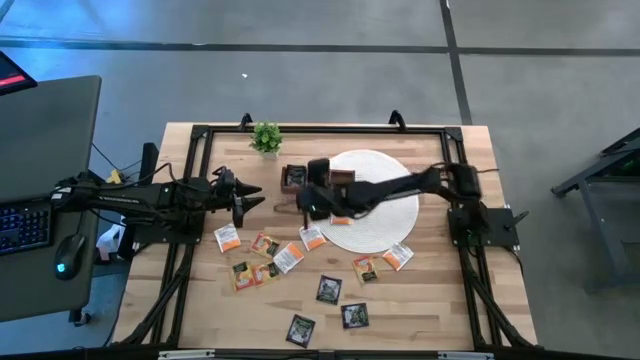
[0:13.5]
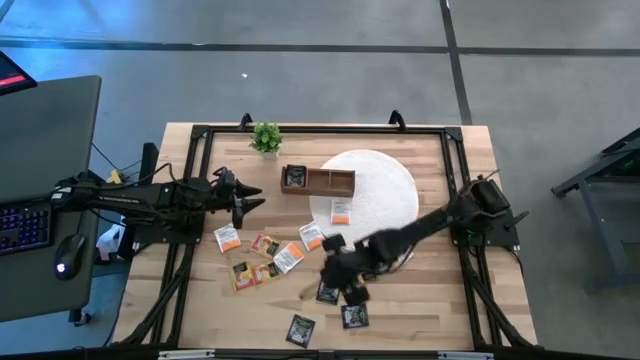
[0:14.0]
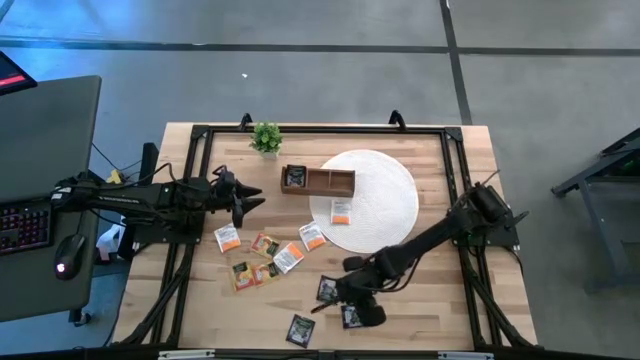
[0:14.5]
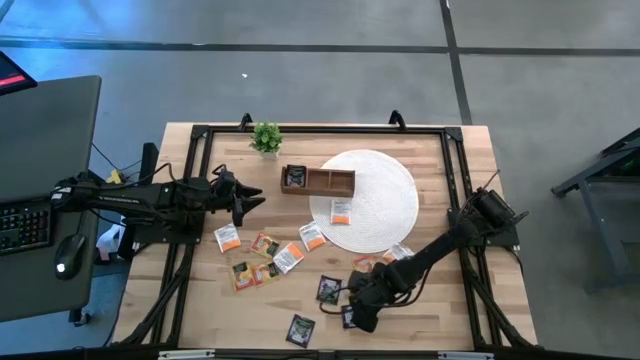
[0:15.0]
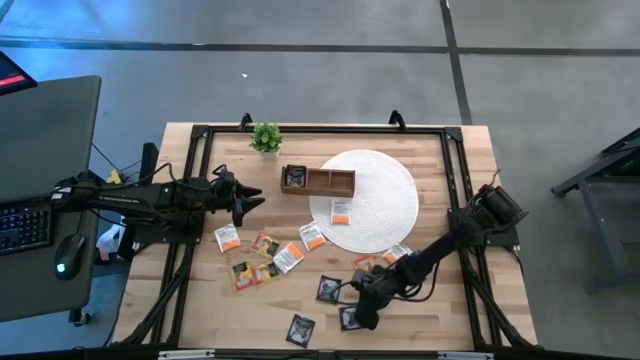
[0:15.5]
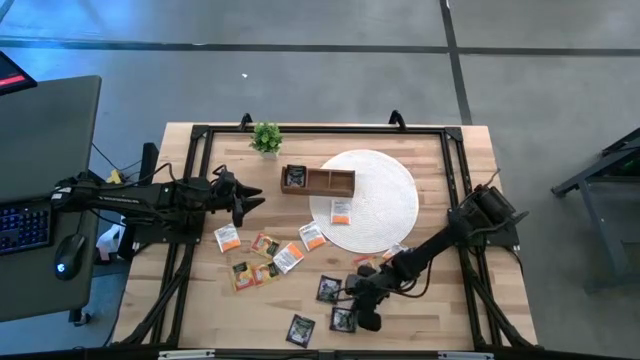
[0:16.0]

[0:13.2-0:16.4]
Task: Pick & Place Tea
Put the violet tea bag into the left section of the wooden organizer

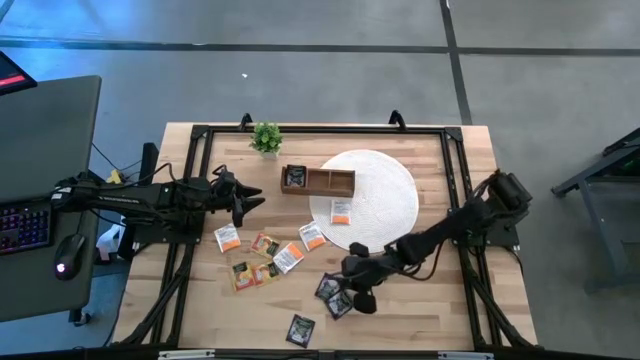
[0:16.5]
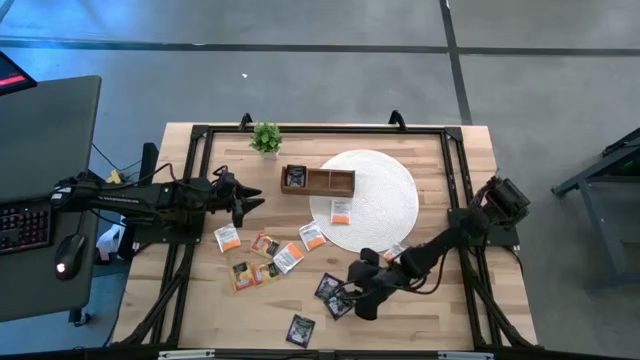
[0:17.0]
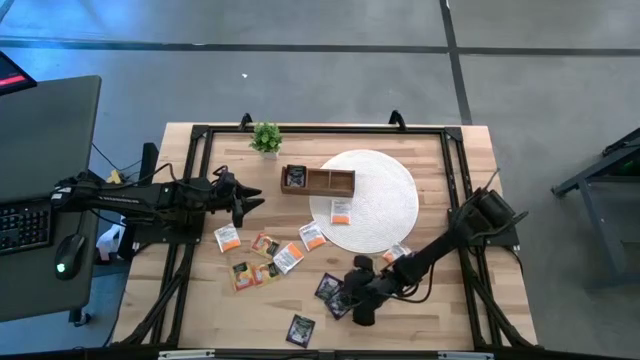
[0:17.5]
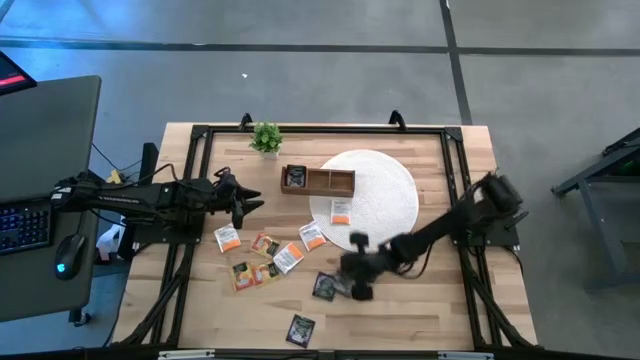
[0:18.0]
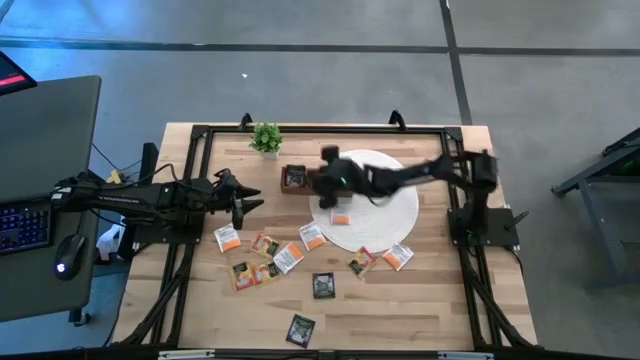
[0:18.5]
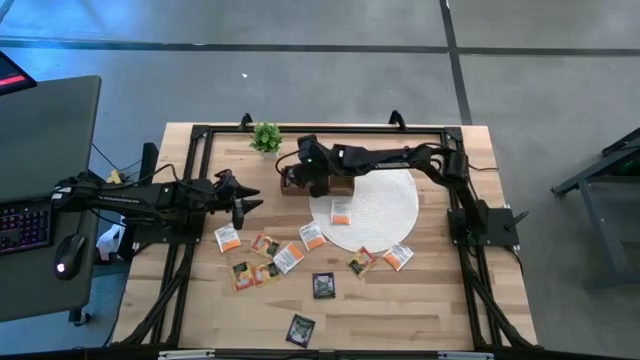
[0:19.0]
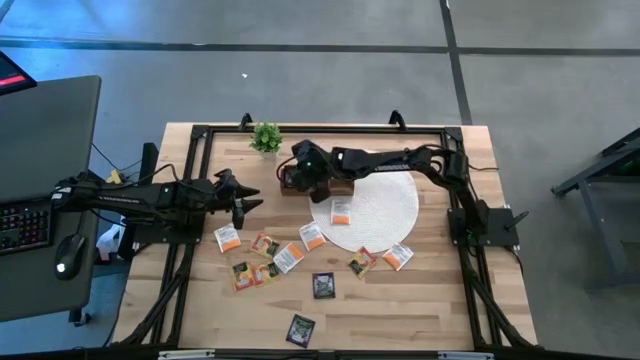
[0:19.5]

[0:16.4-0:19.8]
Put the violet tea bag into the left section of the wooden organizer

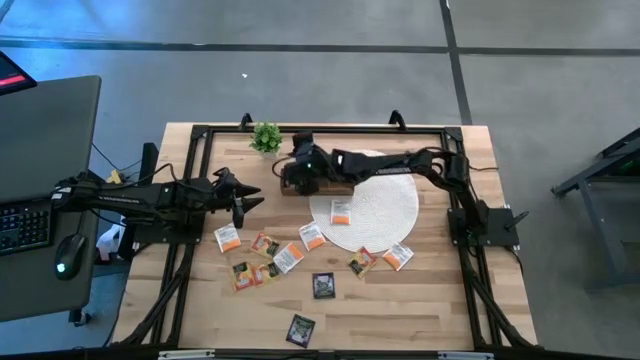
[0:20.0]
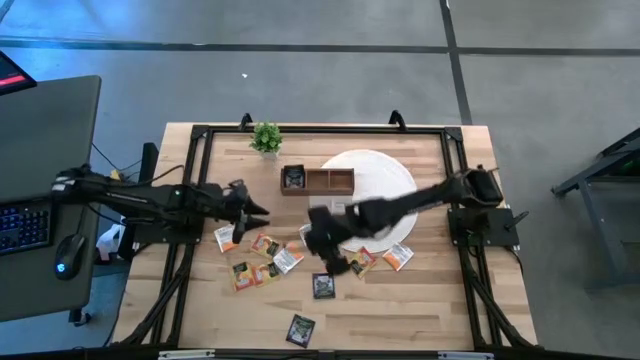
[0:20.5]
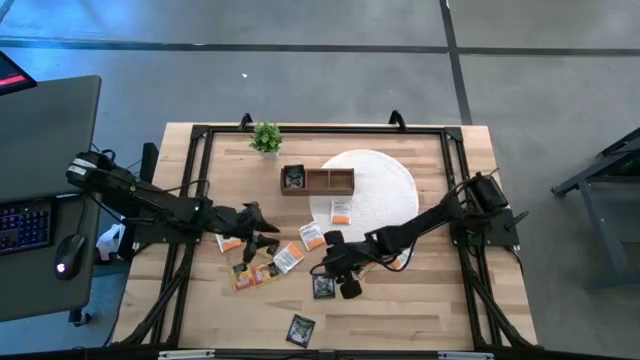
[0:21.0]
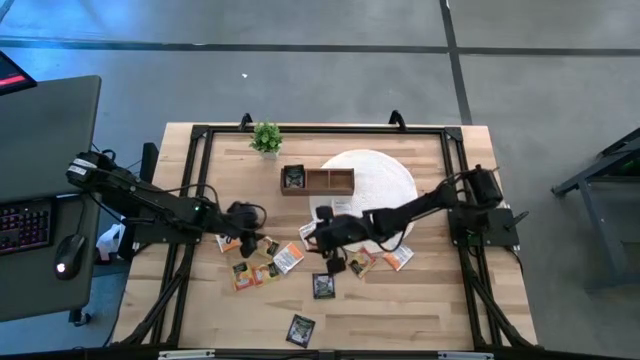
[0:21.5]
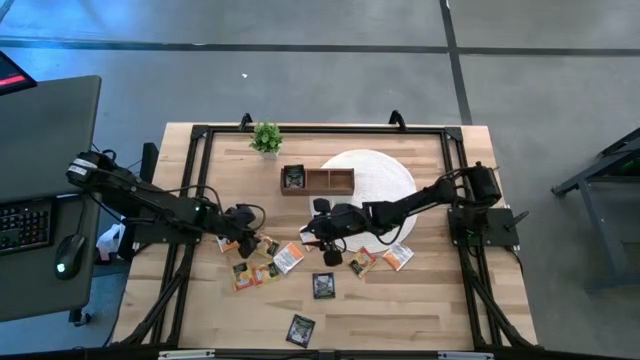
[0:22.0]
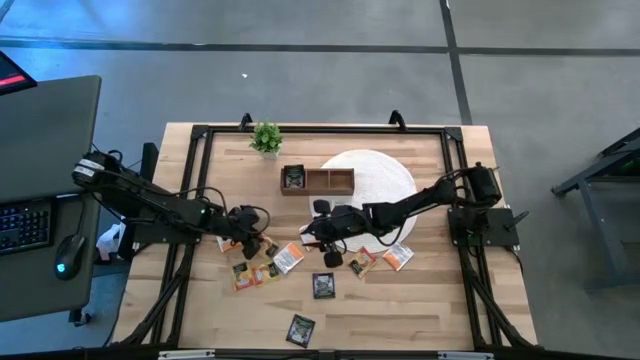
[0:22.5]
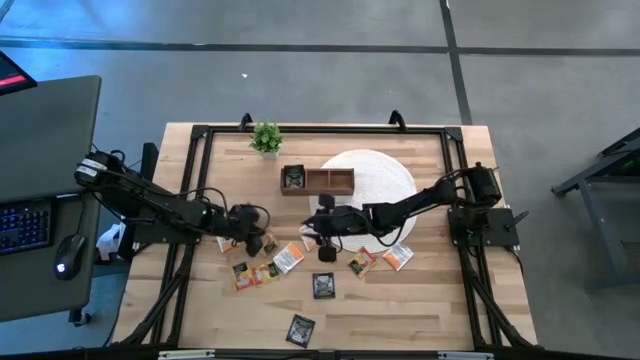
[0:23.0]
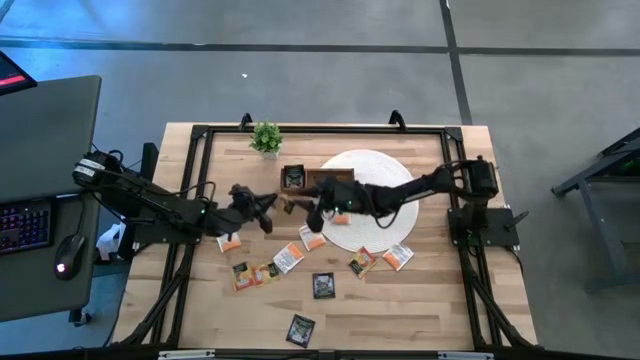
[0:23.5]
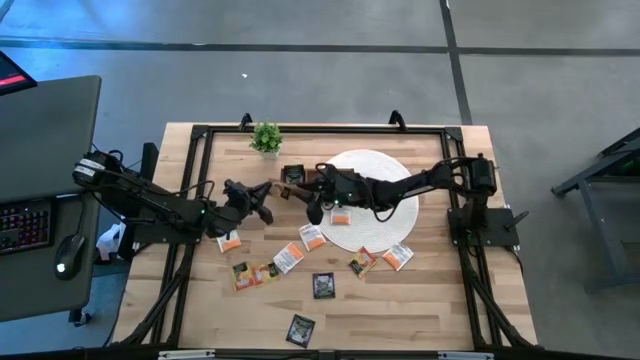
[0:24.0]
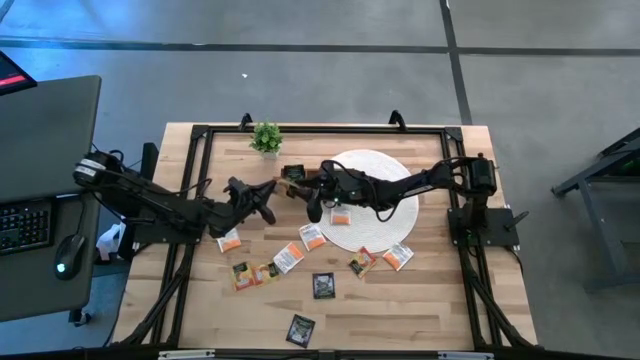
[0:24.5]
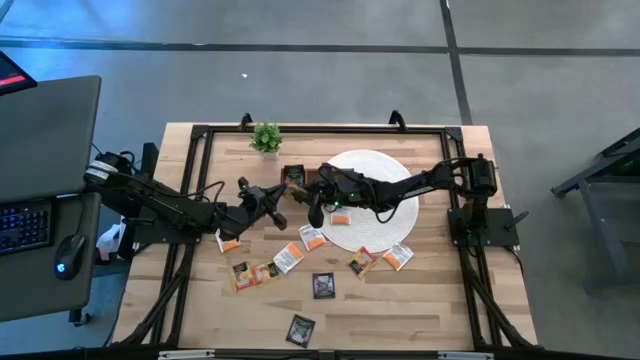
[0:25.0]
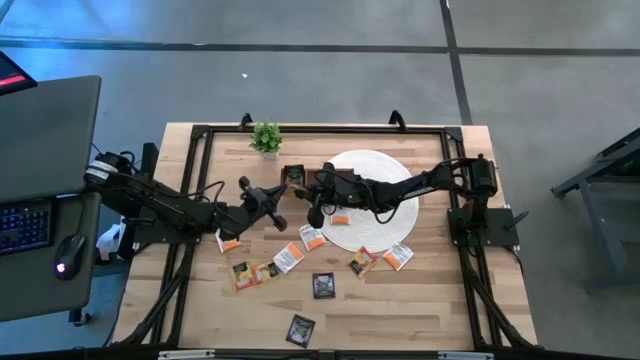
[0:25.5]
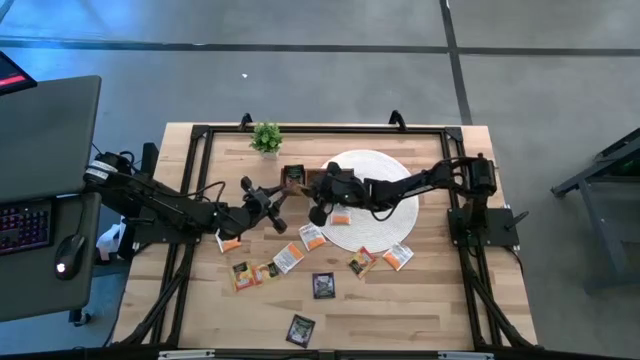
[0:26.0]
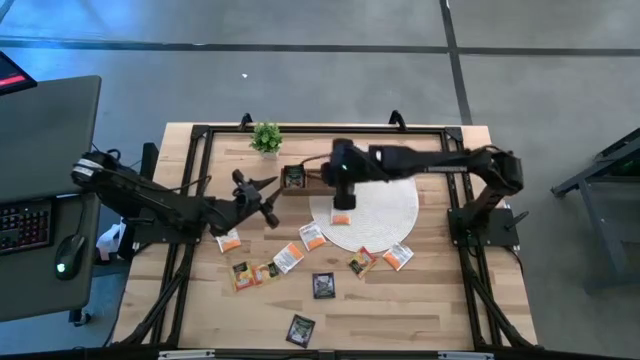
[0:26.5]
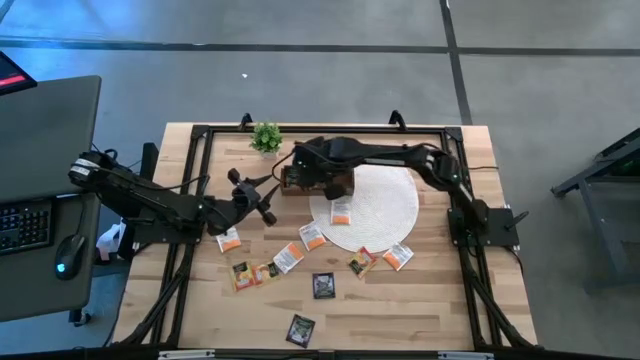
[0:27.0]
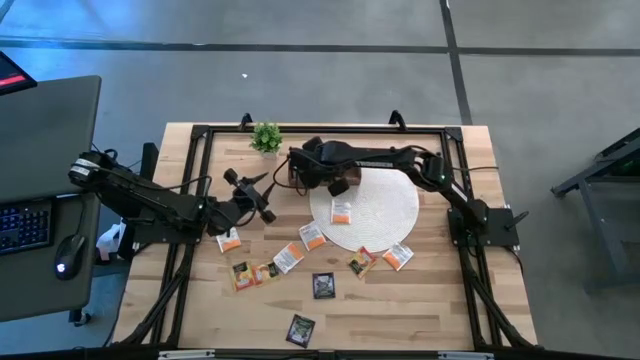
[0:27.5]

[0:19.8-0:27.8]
Put the orange tea bag into the middle section of the wooden organizer

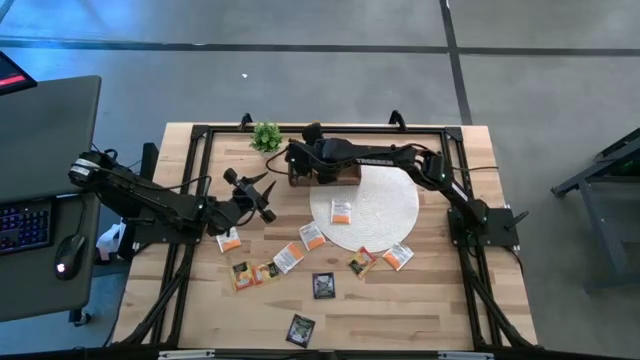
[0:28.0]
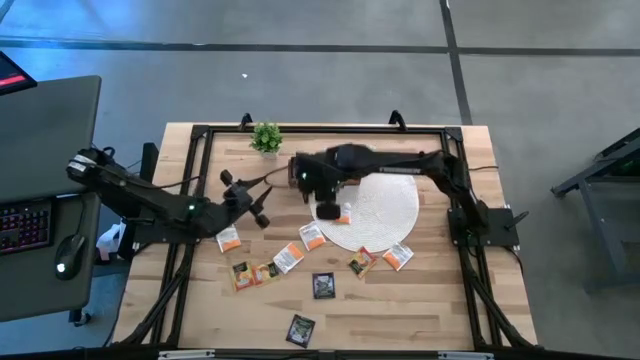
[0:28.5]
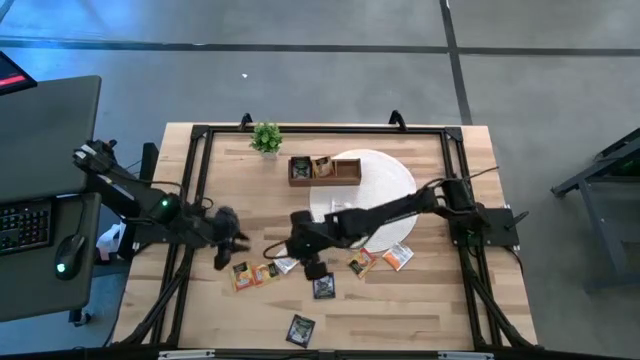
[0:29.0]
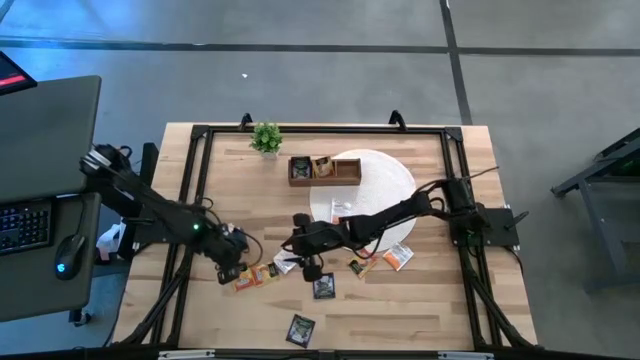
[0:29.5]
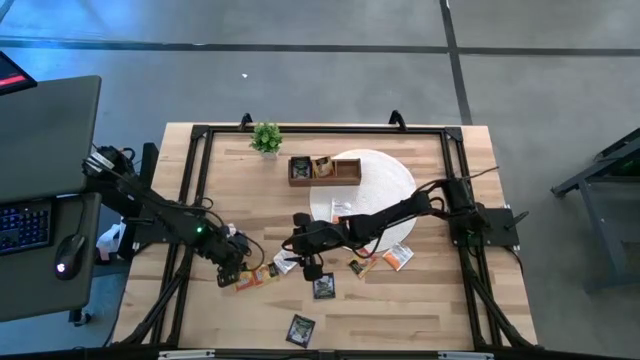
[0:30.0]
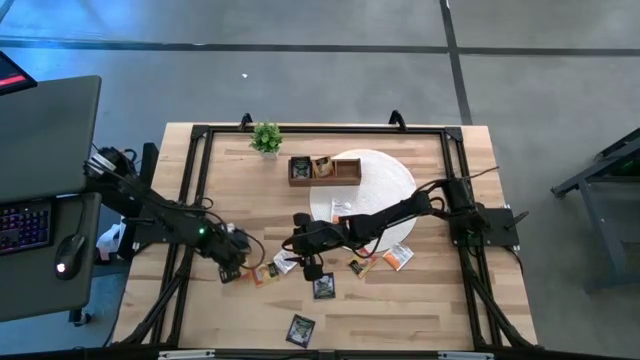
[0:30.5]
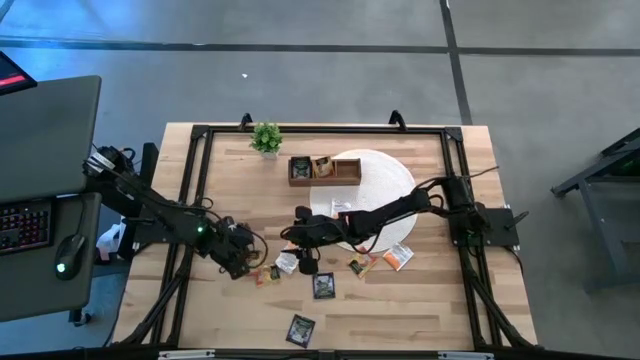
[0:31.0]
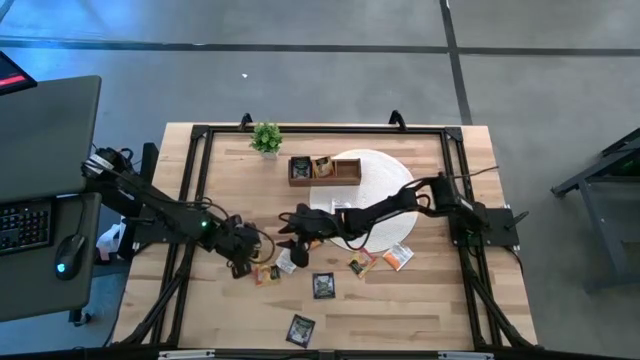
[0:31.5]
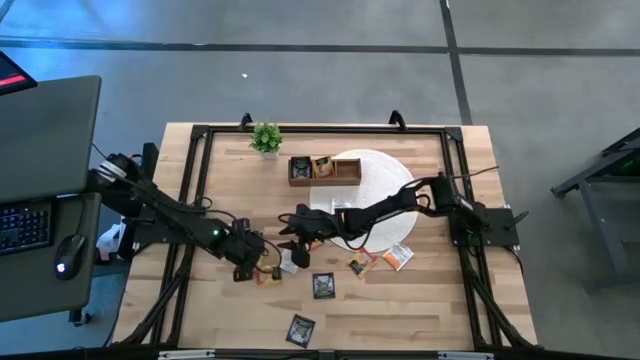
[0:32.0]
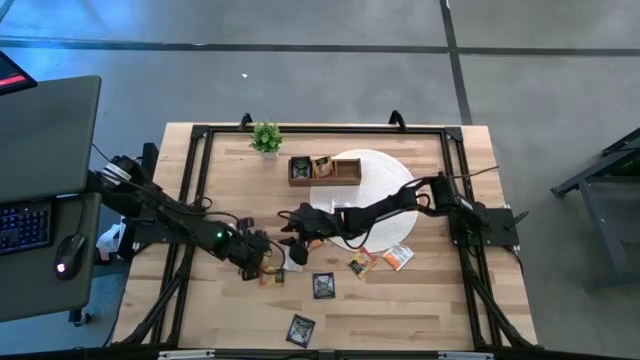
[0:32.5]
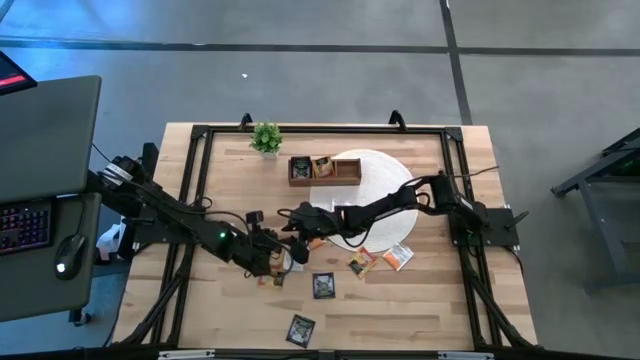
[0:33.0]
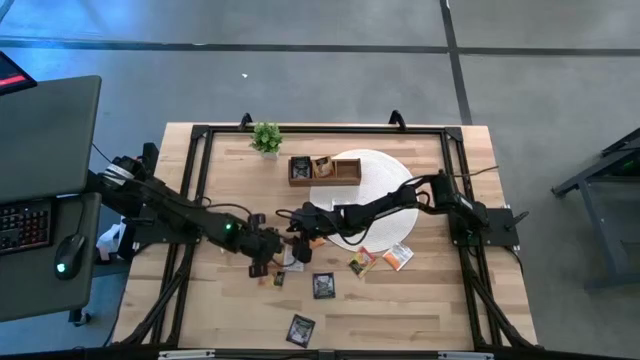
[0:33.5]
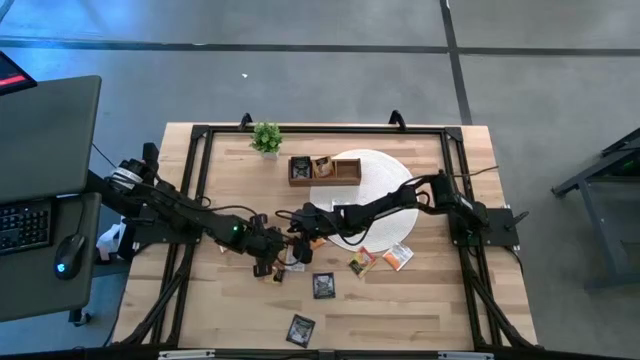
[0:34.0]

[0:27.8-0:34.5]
Put the orange tea bag into the middle section of the wooden organizer

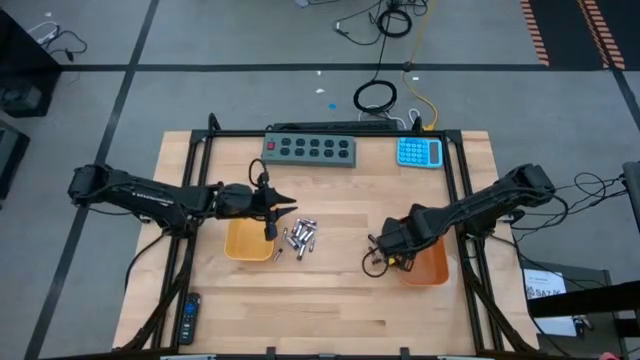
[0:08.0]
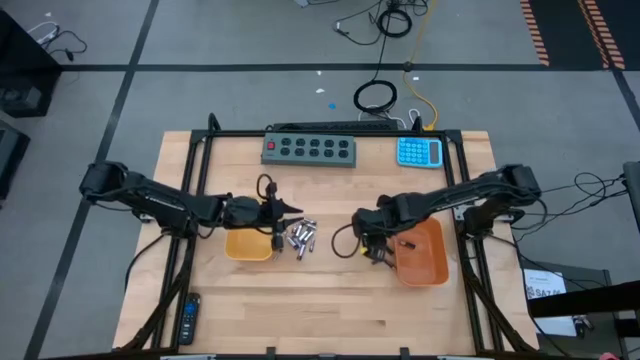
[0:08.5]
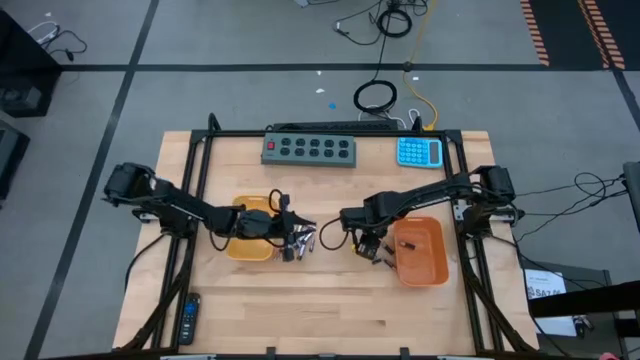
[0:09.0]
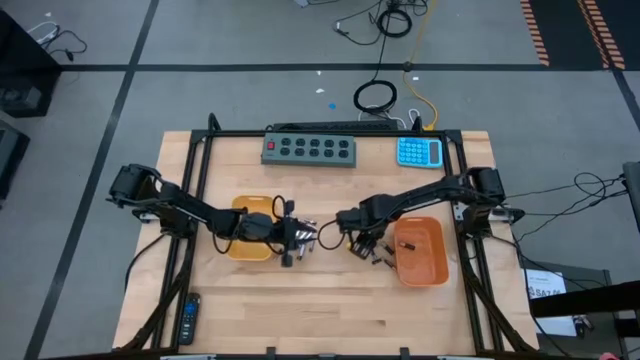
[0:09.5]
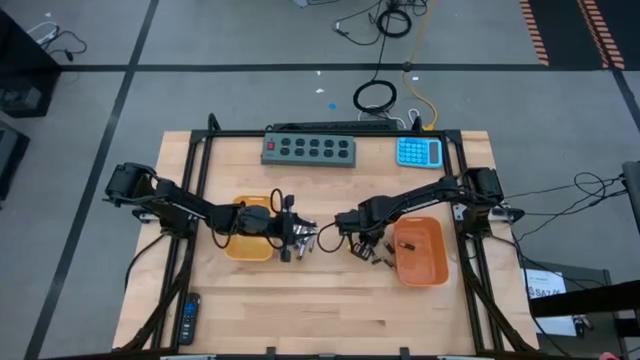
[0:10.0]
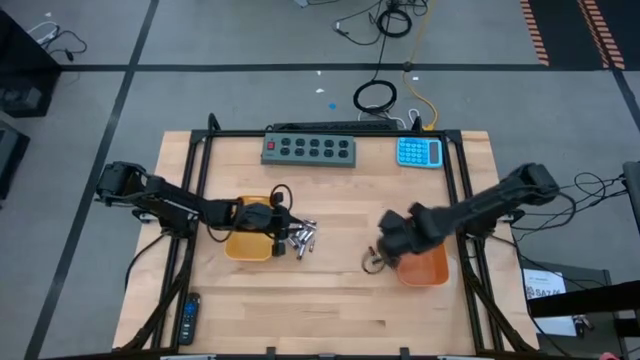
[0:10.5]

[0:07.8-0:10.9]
Task: Sort batteries
Put the black battery into the orange bin
